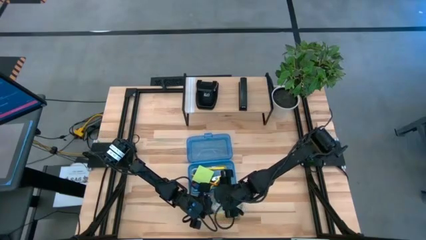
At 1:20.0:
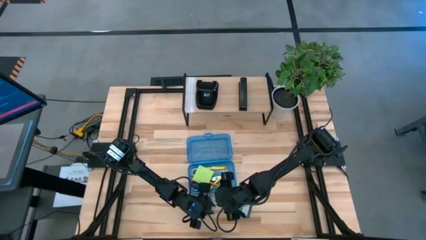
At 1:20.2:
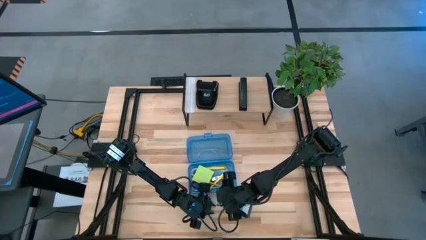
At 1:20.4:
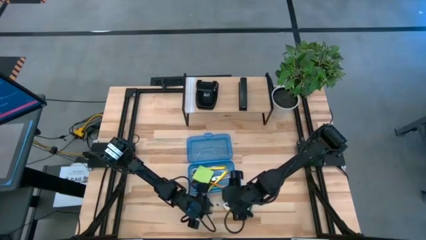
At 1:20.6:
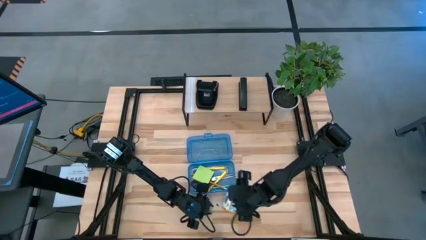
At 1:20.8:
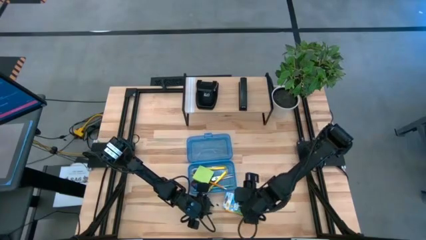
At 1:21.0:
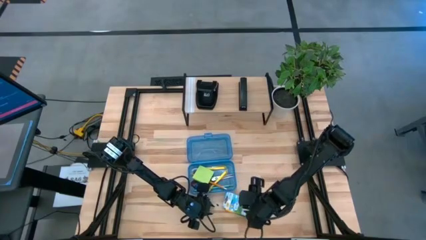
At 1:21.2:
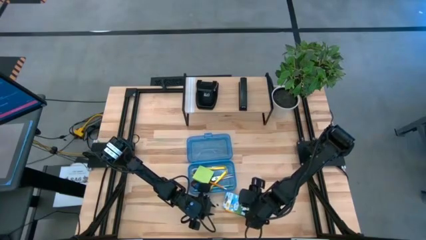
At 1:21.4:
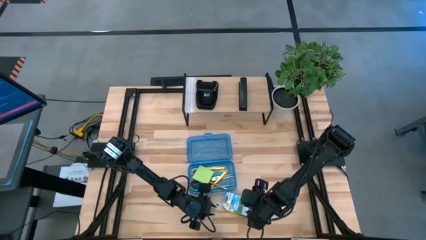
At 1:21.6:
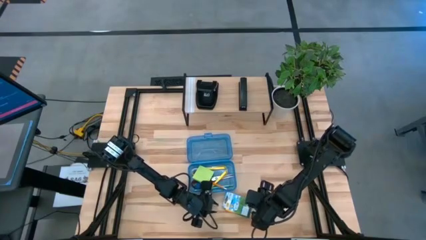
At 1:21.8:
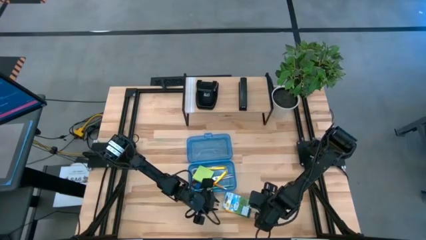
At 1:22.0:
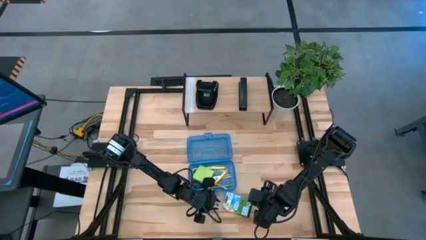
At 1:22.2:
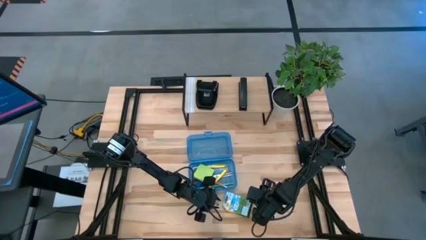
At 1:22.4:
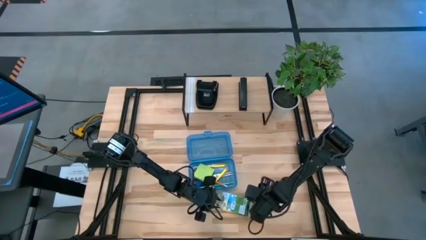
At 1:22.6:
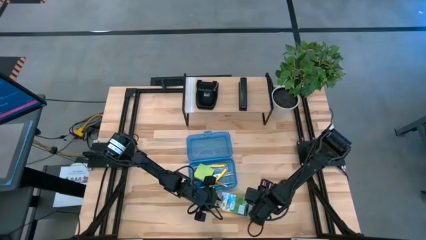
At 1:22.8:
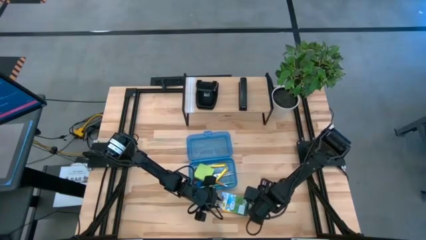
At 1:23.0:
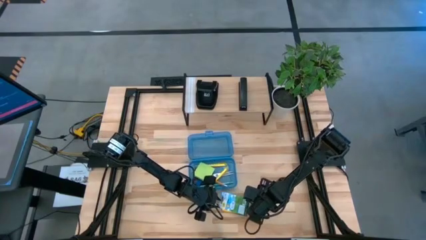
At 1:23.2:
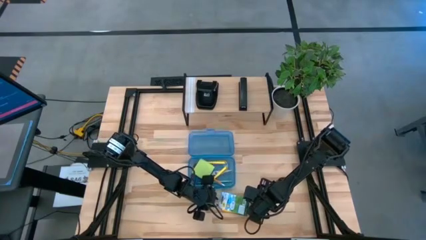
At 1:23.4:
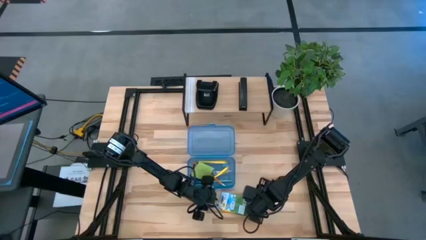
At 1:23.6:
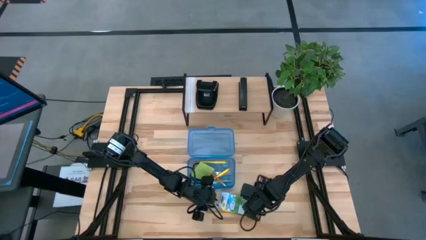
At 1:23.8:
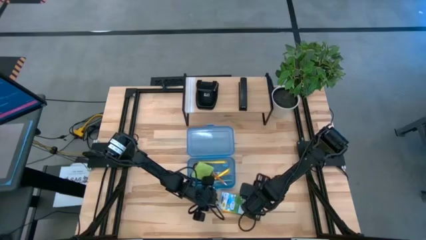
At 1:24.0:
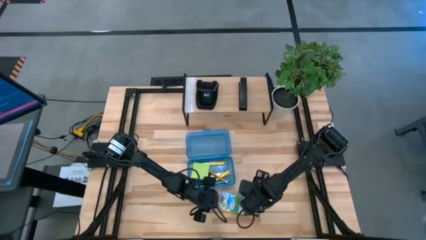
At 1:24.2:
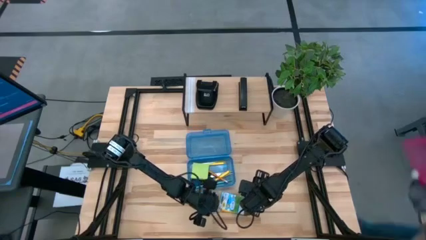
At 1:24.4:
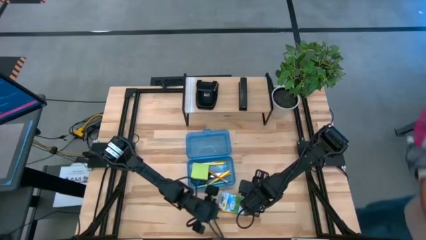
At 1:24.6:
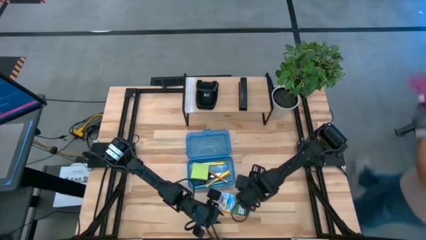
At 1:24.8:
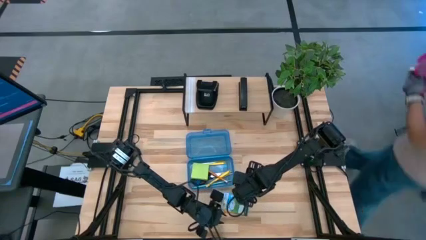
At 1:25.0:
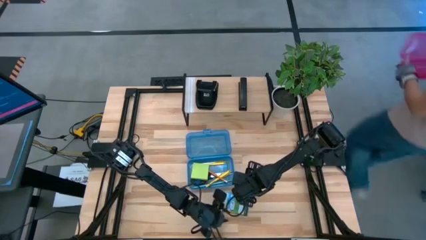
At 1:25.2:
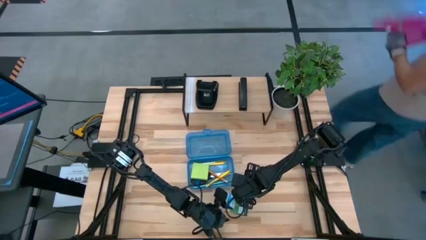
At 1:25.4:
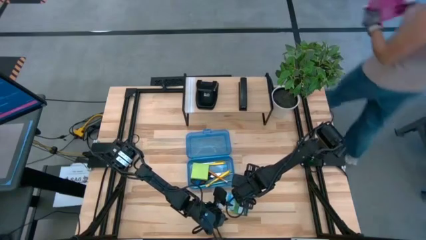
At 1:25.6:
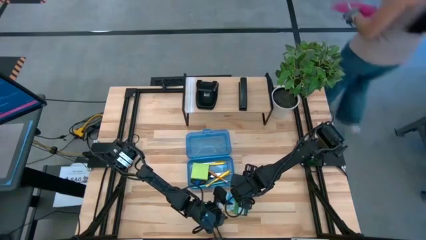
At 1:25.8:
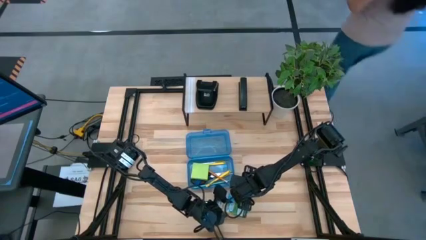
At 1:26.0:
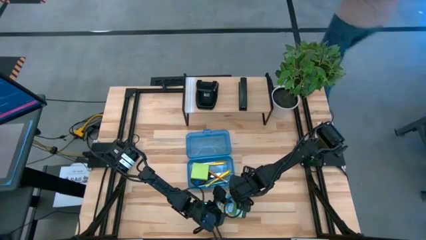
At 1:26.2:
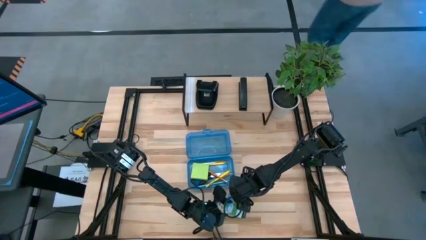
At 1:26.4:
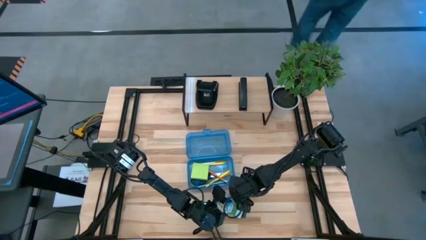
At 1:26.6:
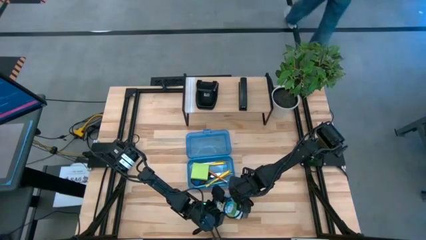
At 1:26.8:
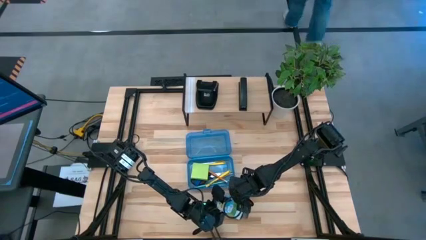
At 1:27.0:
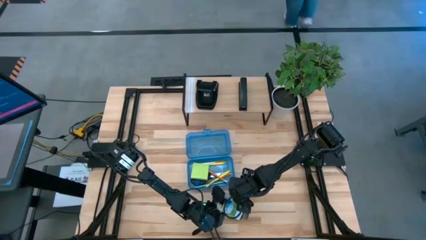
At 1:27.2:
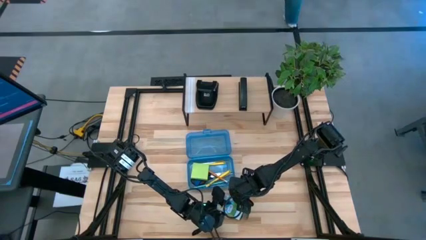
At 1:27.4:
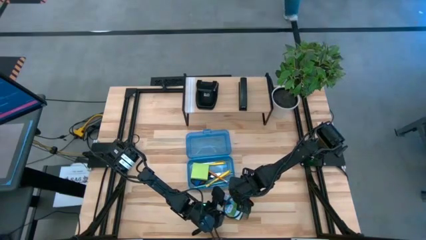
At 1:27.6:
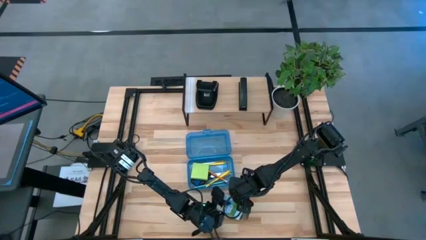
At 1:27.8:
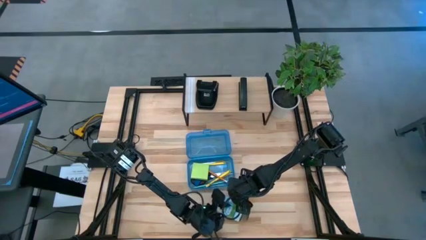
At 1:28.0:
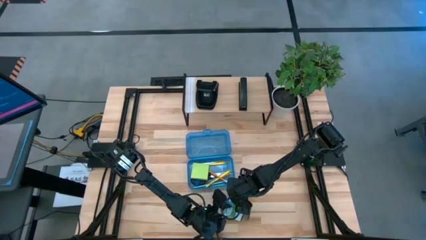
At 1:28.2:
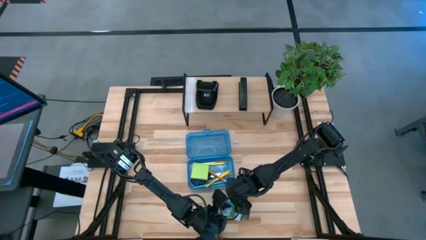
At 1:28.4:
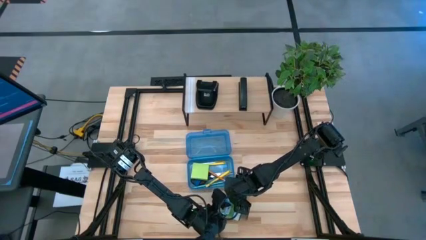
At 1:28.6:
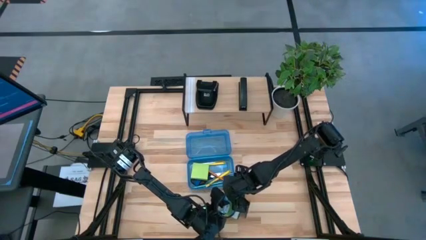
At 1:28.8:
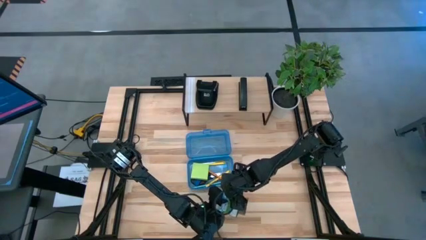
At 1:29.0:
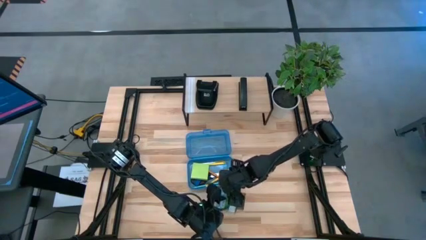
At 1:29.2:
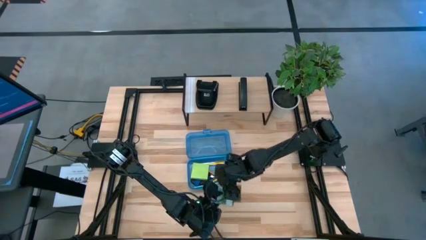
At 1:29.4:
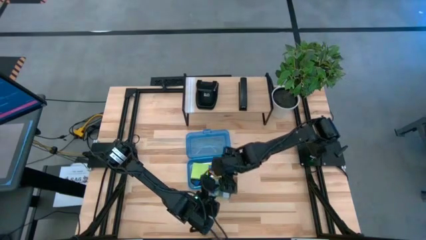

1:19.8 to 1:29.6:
Task: Pack school essentials
Put the crayon box into the supply box

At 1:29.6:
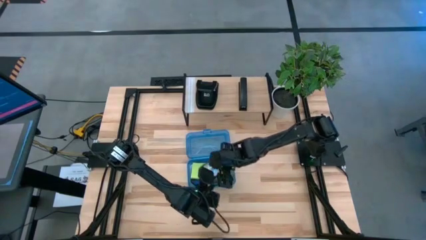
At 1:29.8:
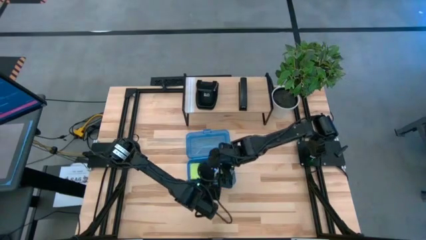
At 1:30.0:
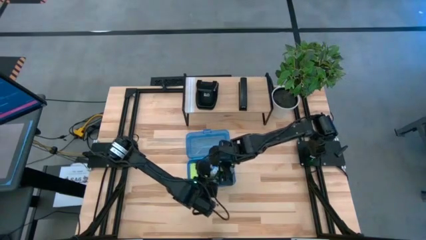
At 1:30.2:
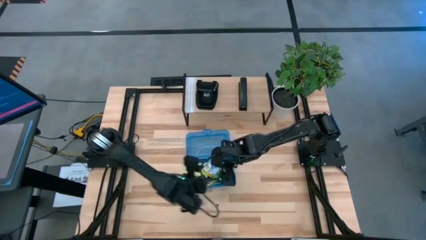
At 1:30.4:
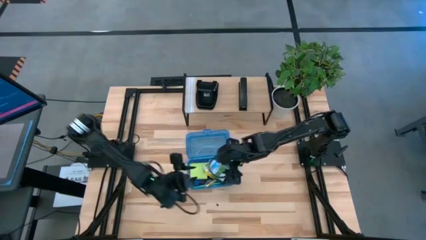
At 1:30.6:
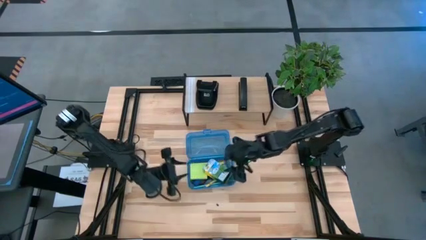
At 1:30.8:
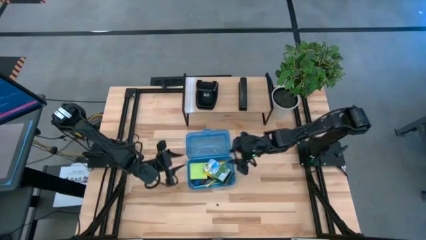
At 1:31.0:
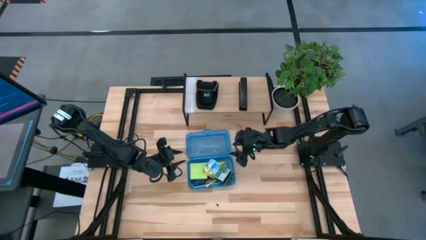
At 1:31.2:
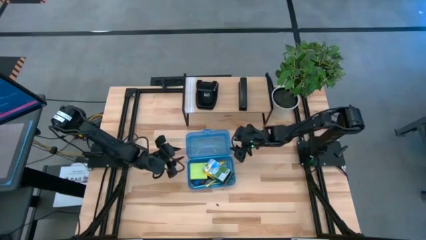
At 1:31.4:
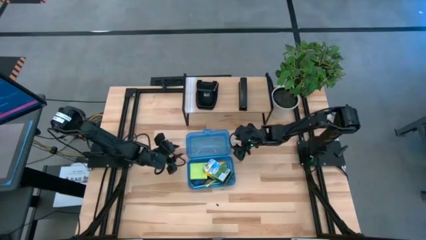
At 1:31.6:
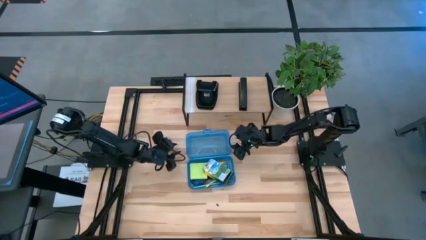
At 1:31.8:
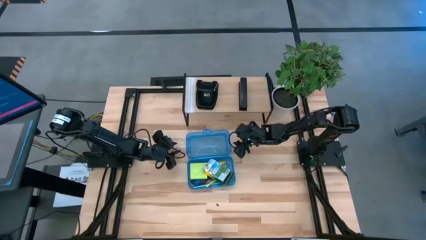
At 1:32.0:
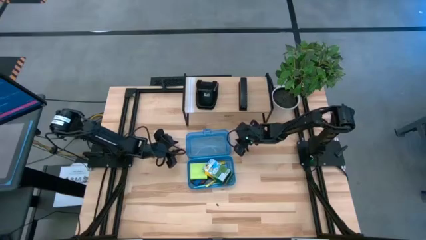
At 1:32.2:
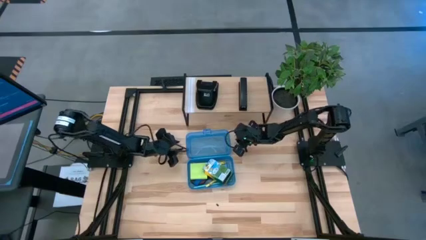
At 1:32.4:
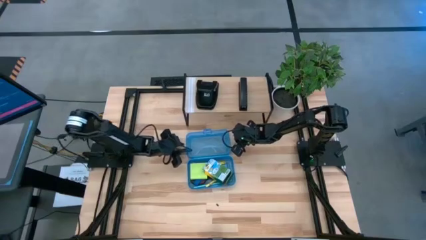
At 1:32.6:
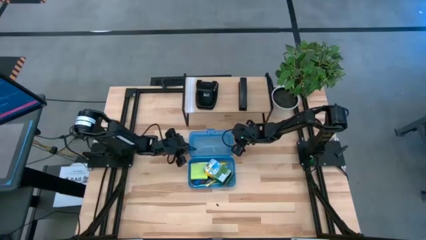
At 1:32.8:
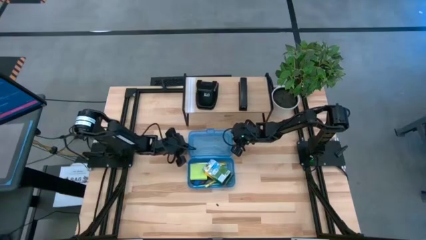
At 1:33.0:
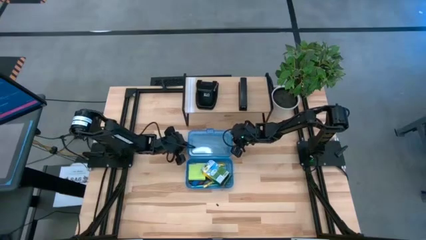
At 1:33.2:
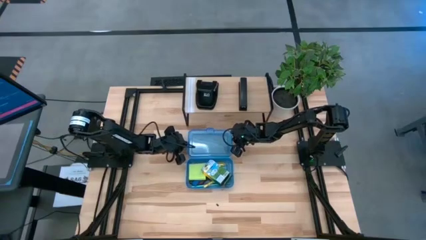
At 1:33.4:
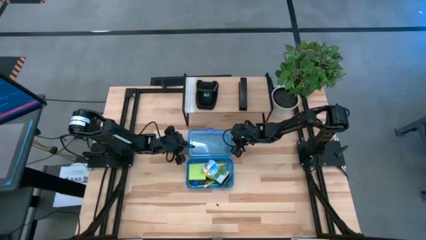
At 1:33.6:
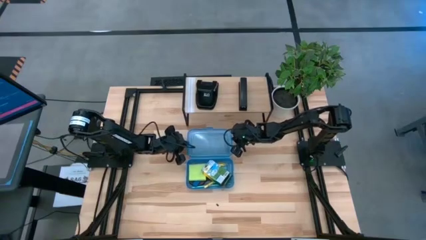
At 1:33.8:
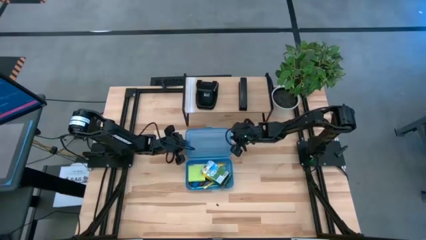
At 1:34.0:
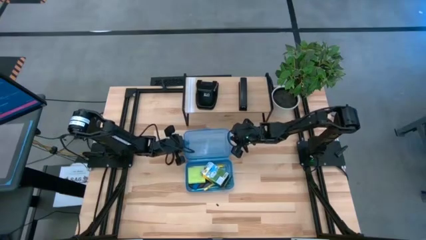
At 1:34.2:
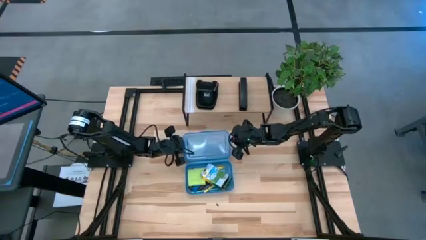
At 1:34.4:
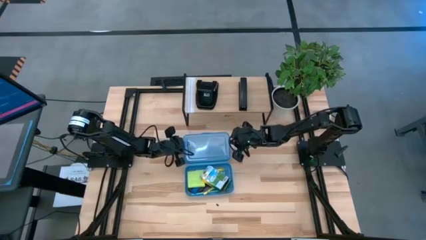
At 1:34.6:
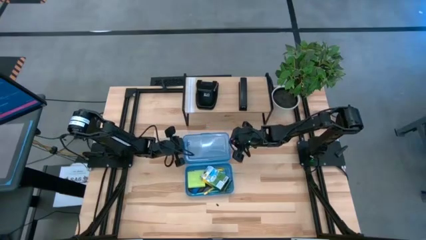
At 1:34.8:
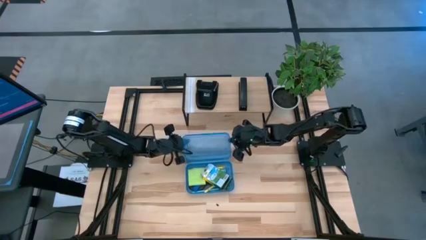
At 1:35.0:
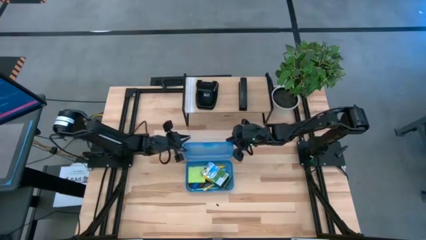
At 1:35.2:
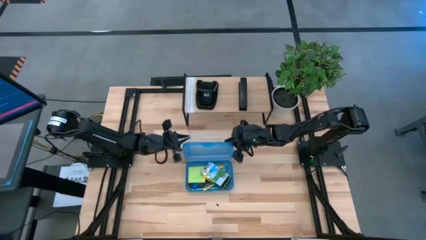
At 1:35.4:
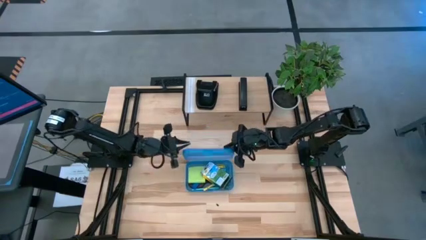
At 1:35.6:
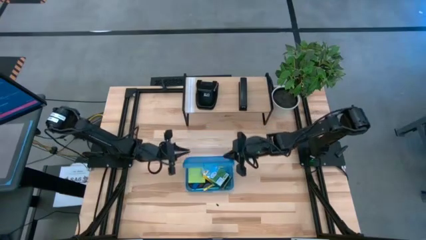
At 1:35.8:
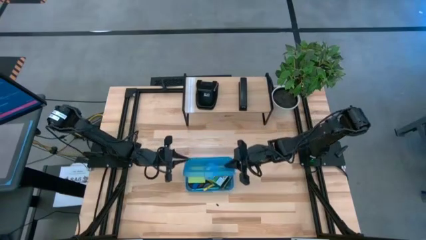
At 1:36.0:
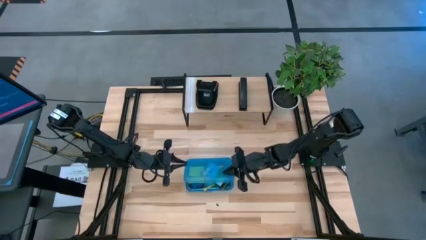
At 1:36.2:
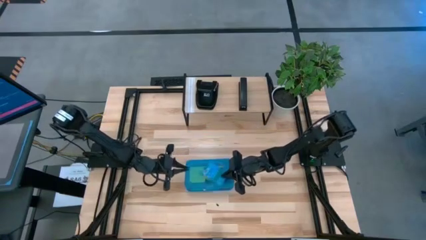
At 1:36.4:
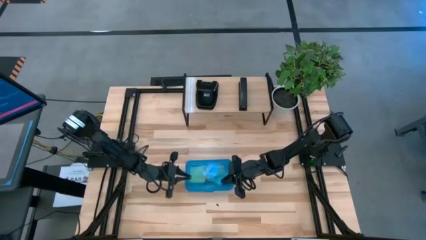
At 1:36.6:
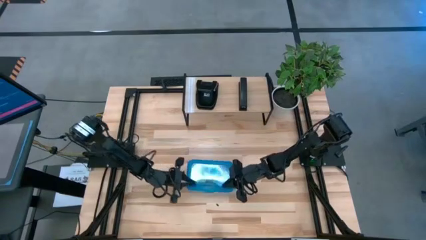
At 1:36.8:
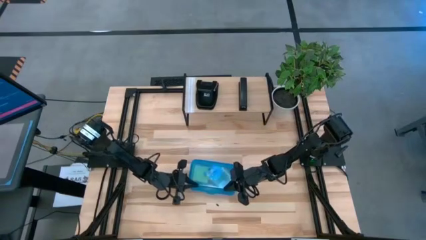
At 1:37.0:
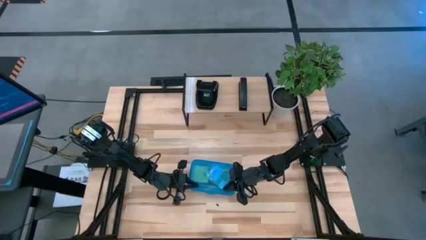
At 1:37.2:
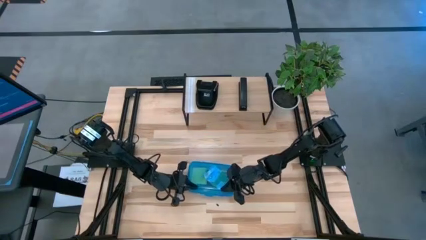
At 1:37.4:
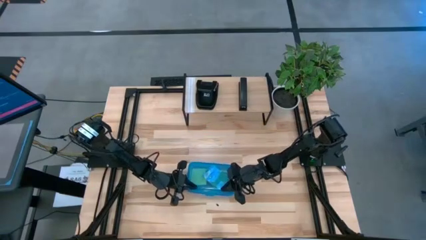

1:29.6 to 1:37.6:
Close the supply box
